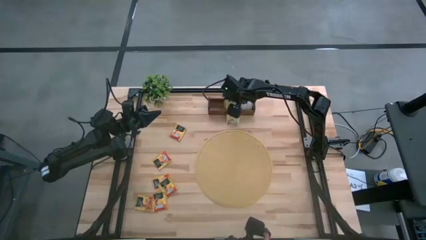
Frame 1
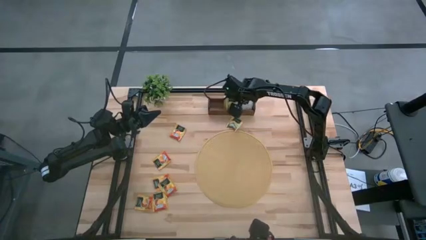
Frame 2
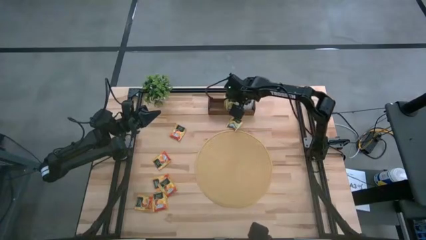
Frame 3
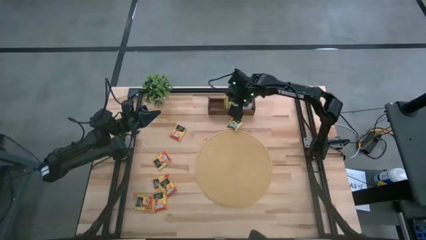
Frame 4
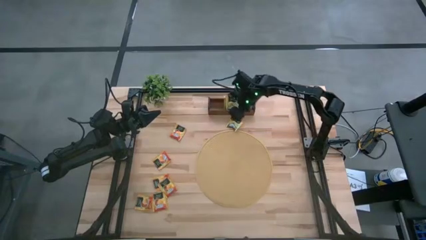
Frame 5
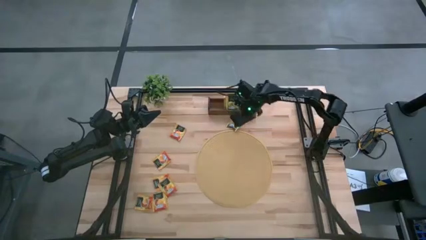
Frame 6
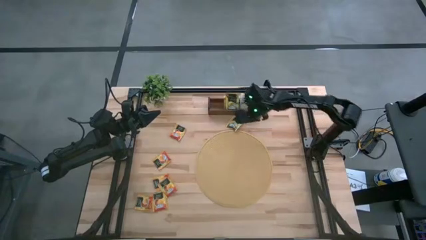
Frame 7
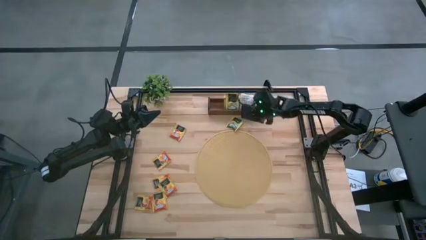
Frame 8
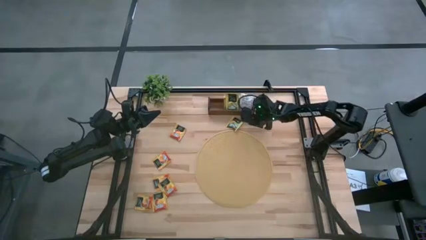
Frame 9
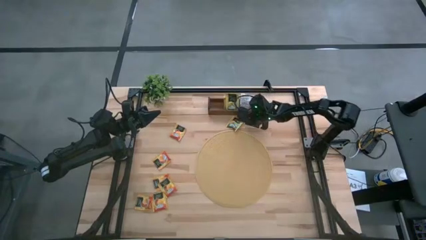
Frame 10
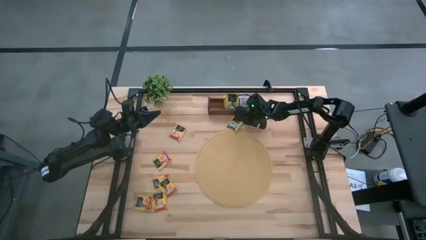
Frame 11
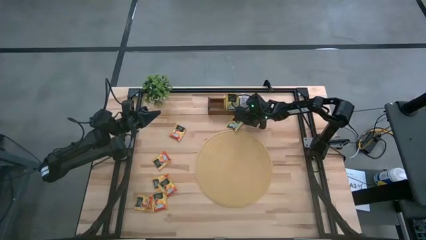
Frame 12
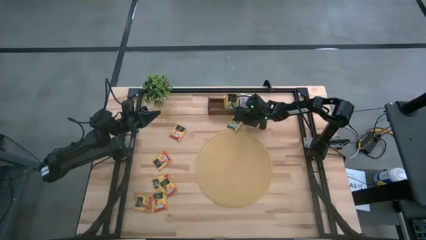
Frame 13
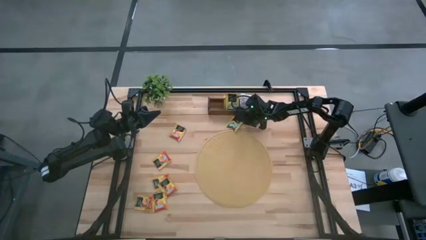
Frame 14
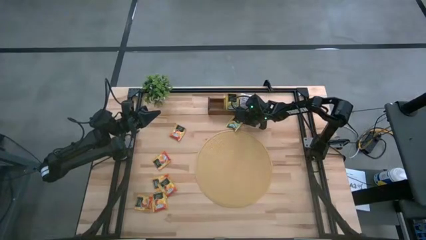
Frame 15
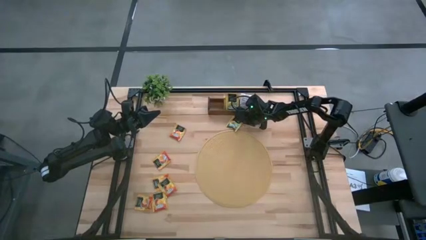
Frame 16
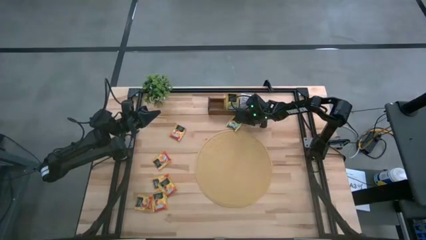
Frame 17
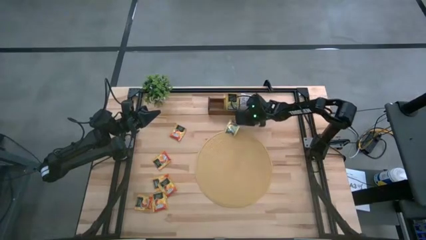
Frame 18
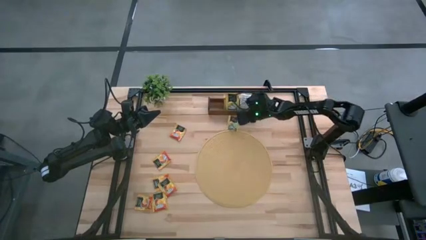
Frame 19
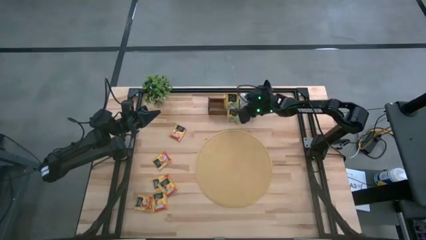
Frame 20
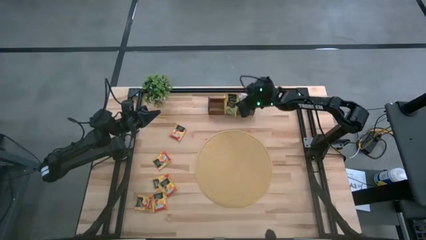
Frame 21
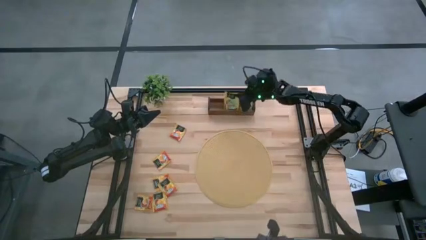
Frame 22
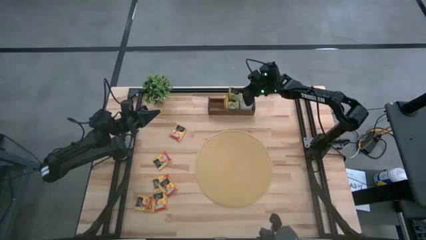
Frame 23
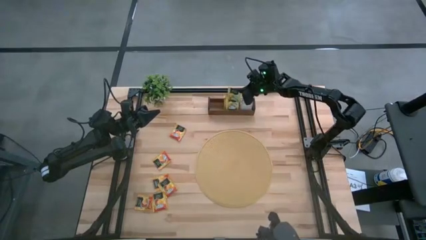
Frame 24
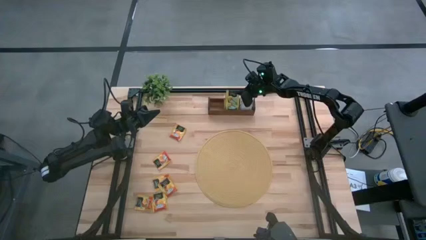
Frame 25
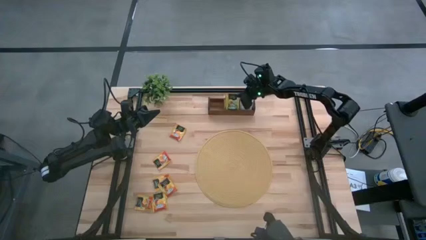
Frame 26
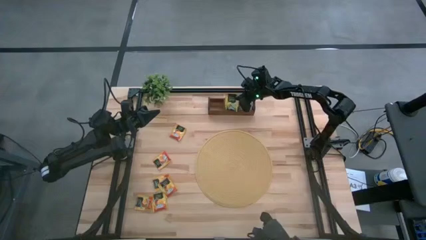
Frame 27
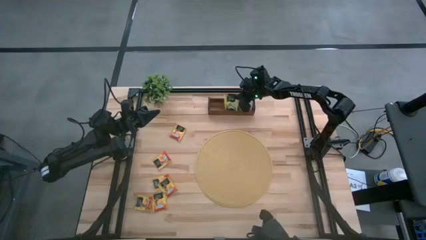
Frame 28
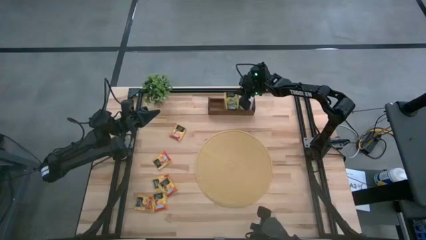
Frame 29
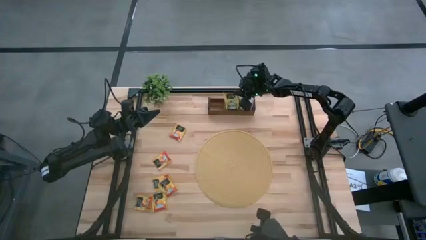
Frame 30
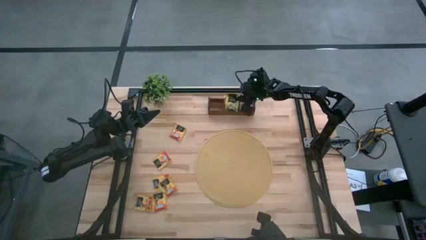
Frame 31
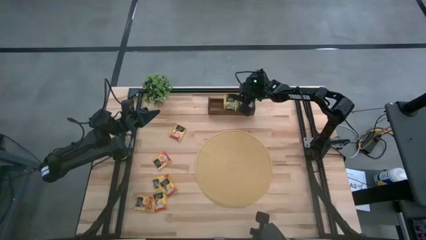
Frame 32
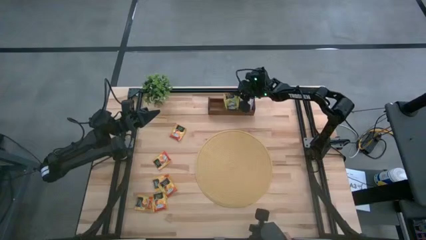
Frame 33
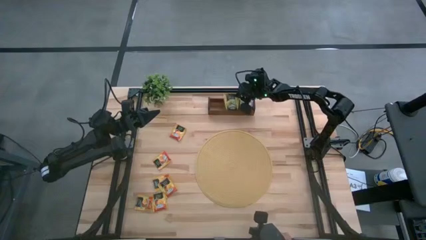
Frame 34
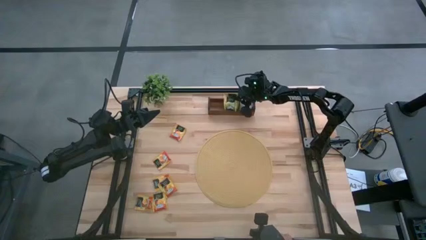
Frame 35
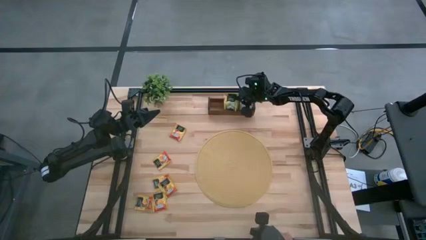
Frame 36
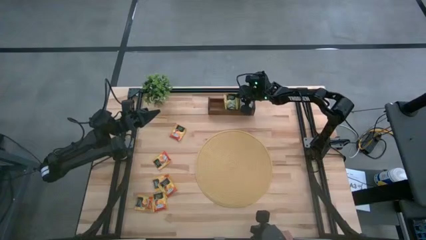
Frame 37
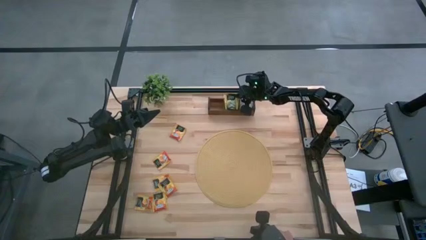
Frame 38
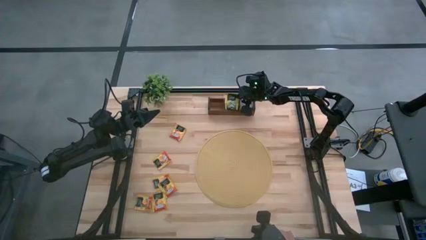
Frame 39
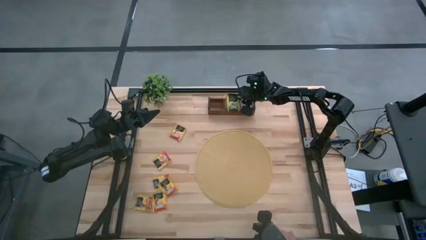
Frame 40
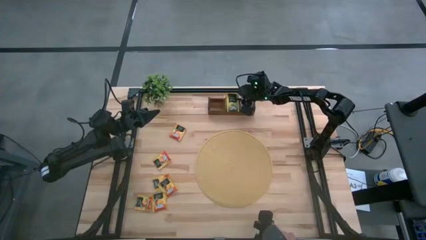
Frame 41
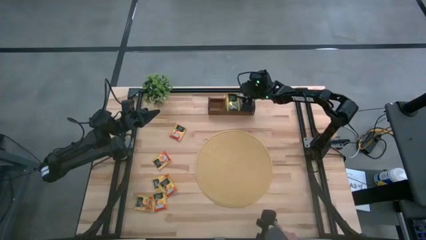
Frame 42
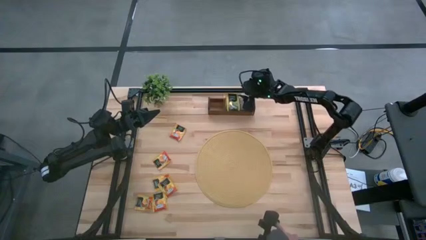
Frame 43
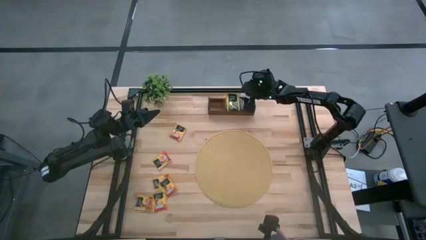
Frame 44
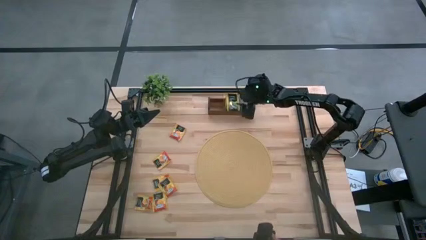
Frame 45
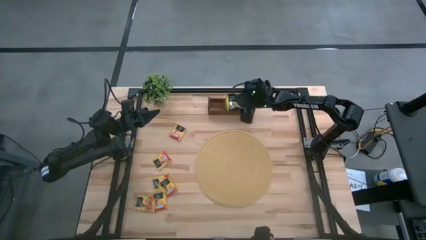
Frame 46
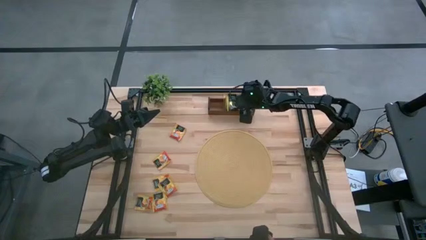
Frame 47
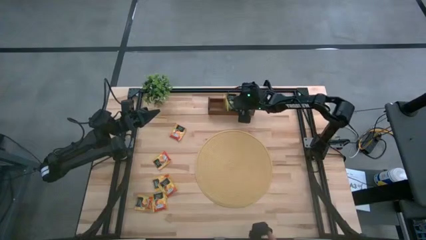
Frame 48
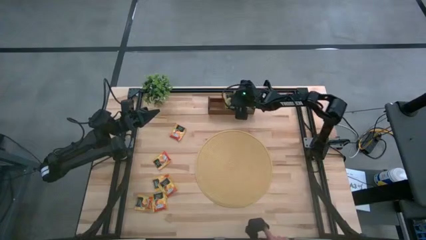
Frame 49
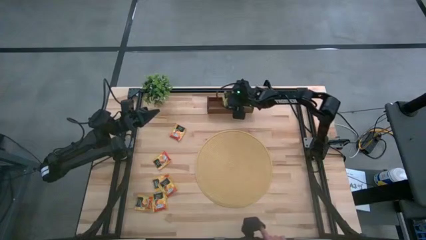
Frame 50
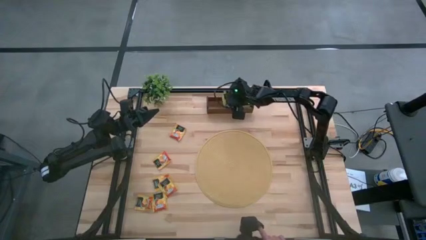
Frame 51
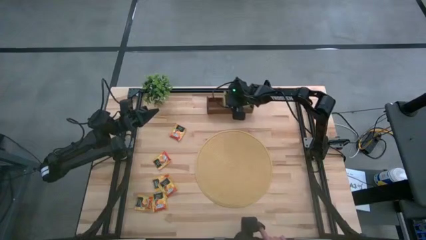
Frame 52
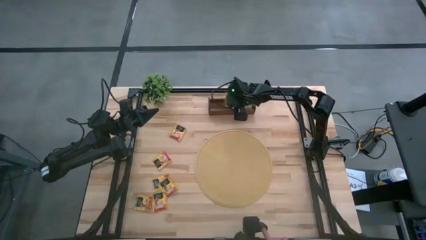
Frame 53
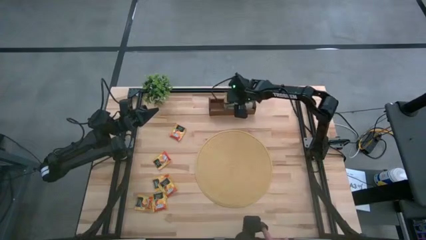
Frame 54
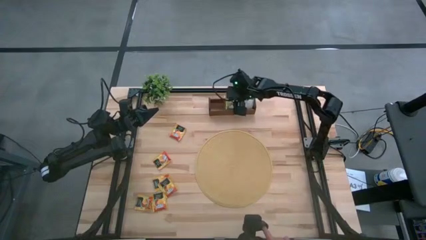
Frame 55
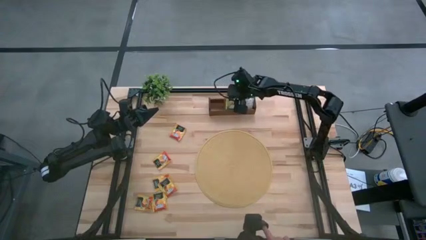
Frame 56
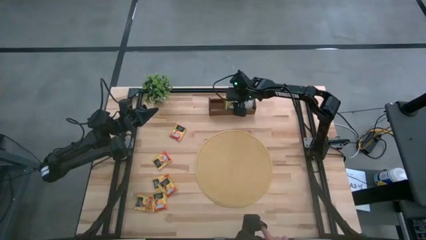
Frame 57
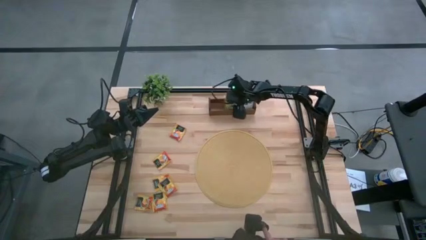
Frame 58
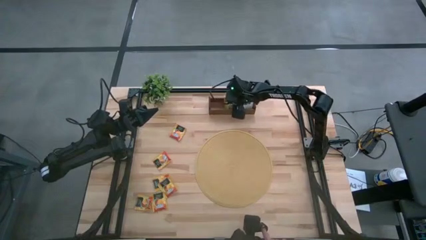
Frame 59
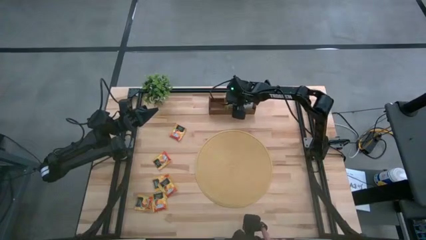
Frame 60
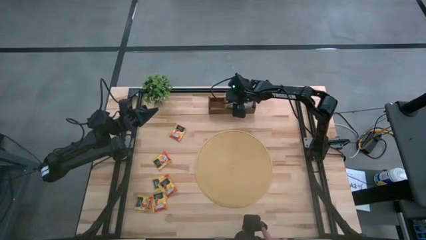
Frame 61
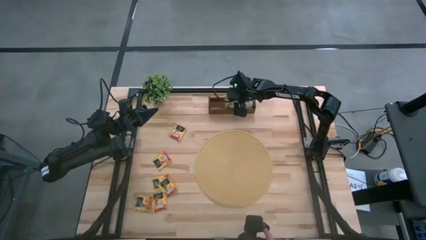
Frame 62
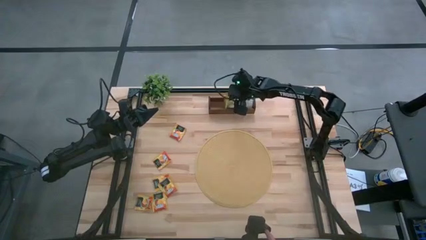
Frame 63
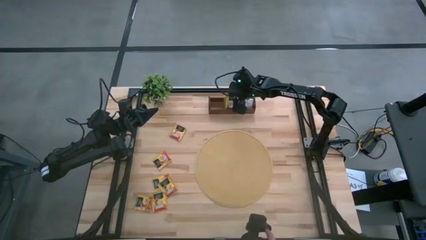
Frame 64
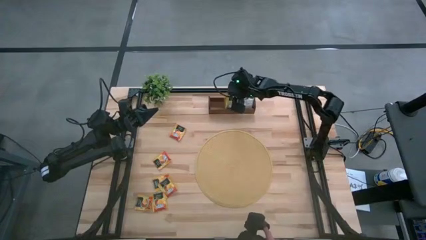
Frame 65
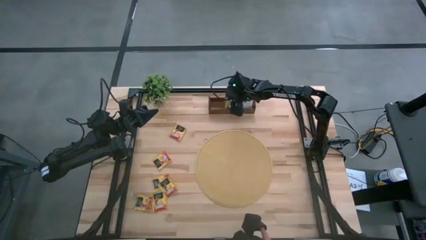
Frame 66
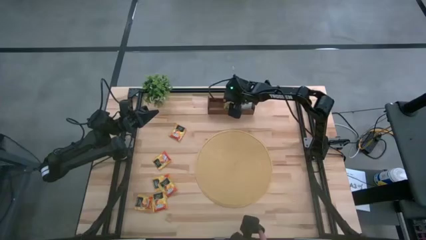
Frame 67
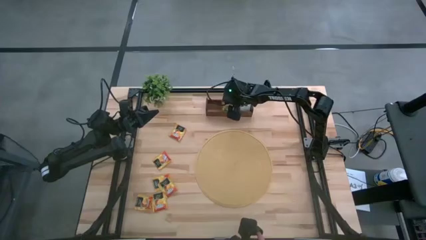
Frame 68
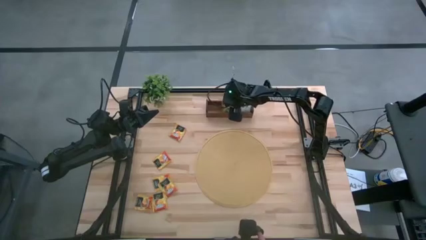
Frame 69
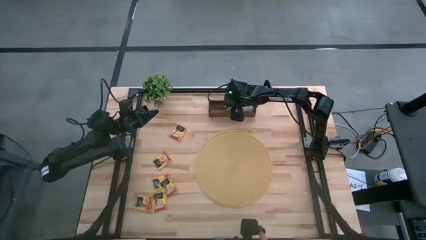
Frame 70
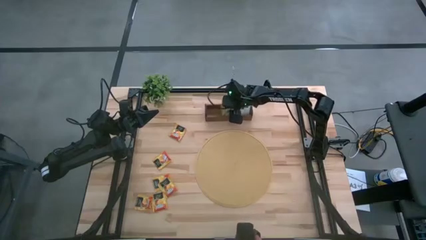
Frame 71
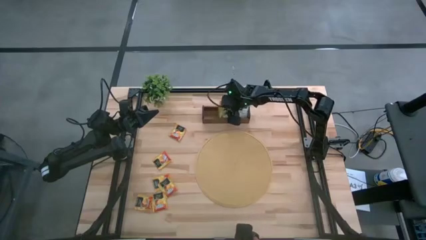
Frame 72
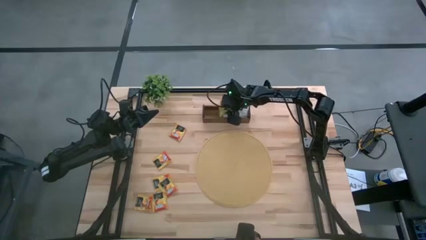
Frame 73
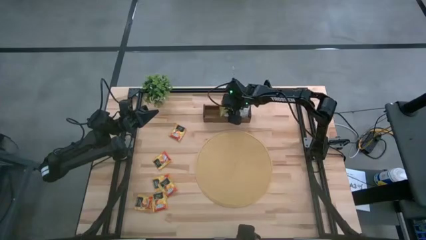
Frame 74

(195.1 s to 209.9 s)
Task: Pick & Place Tea
Put the yellow tea bag into the middle section of the wooden organizer
